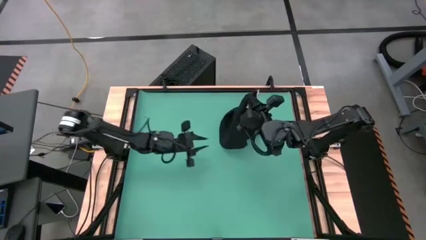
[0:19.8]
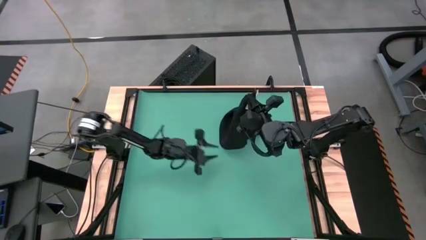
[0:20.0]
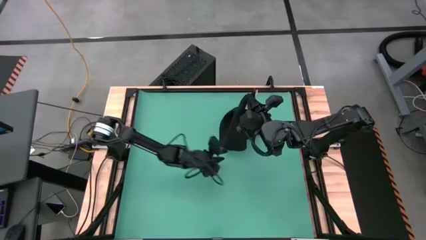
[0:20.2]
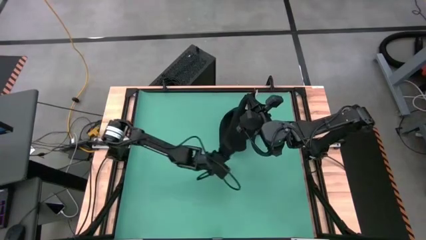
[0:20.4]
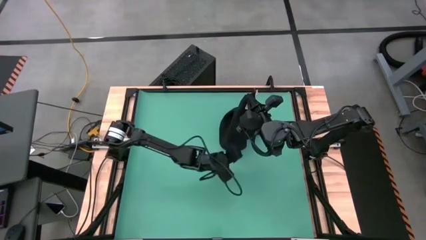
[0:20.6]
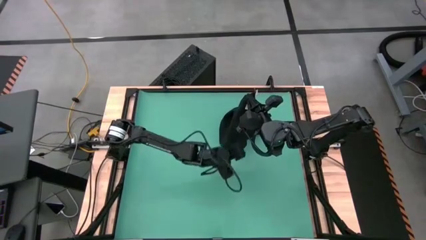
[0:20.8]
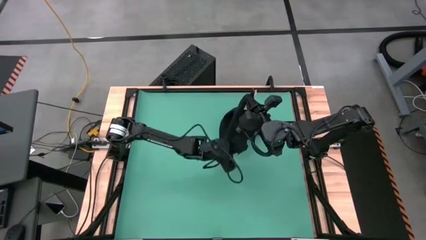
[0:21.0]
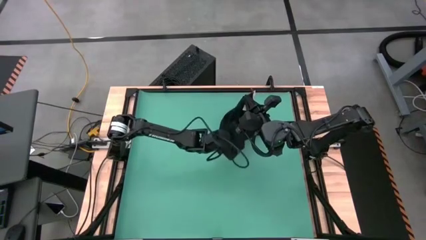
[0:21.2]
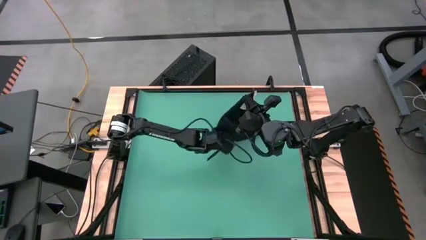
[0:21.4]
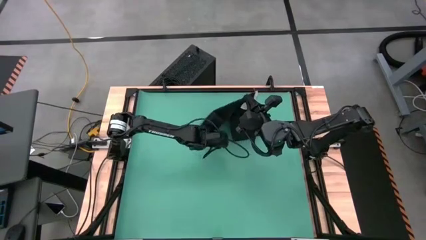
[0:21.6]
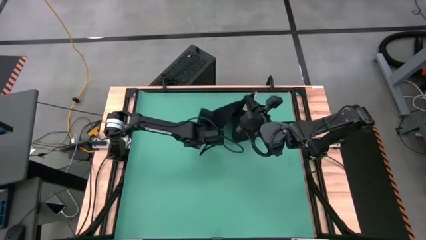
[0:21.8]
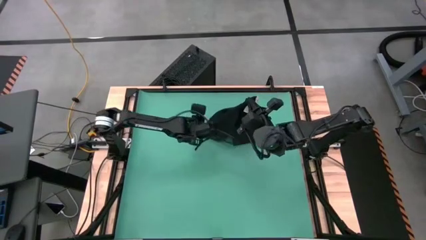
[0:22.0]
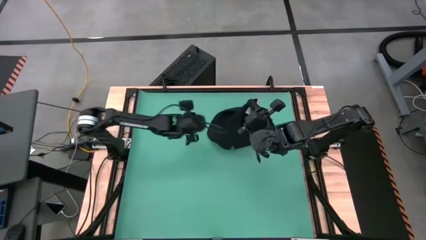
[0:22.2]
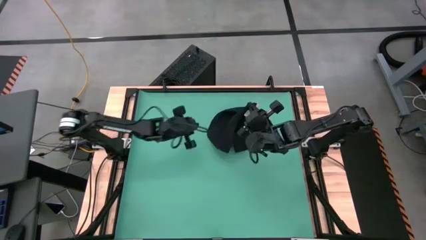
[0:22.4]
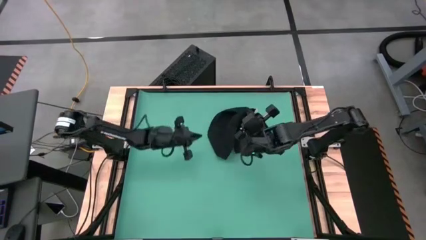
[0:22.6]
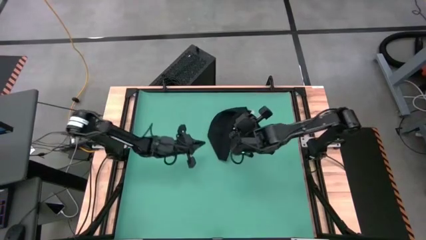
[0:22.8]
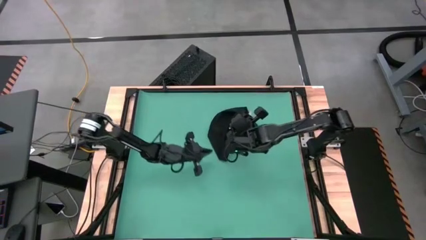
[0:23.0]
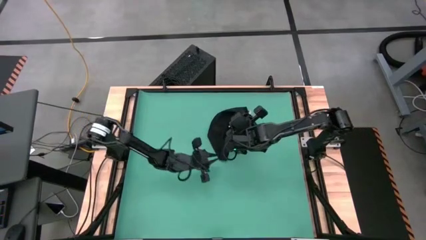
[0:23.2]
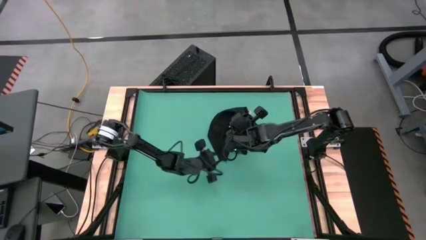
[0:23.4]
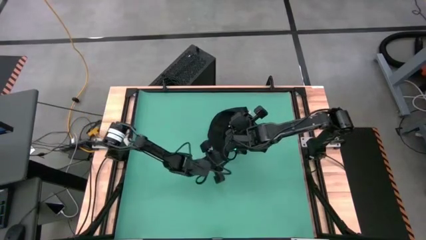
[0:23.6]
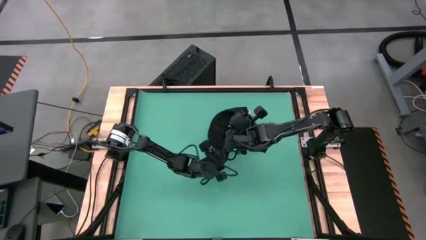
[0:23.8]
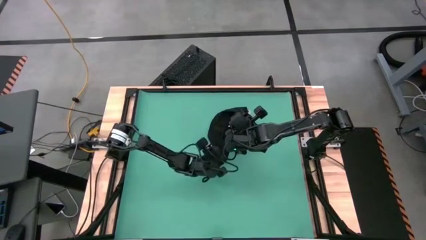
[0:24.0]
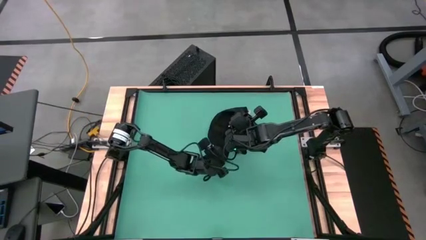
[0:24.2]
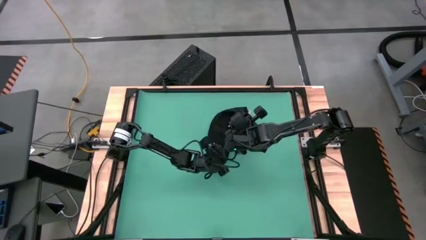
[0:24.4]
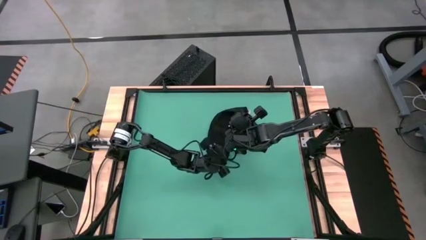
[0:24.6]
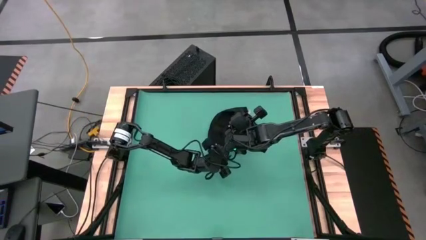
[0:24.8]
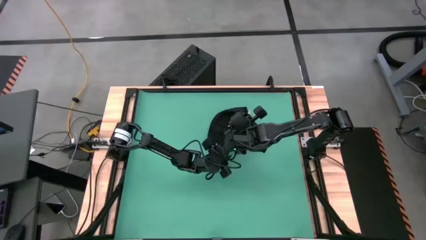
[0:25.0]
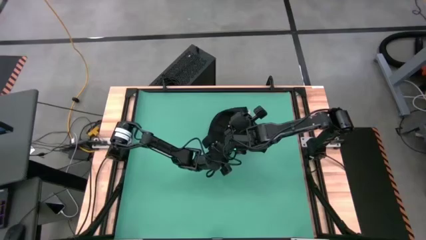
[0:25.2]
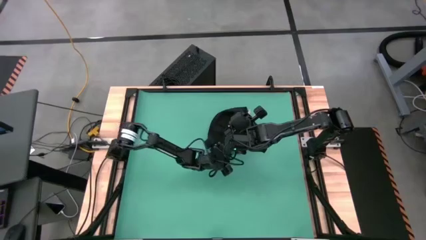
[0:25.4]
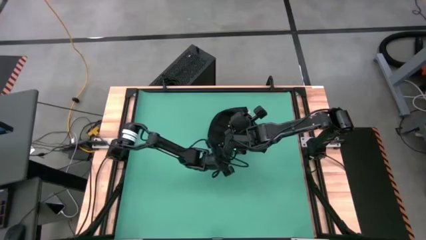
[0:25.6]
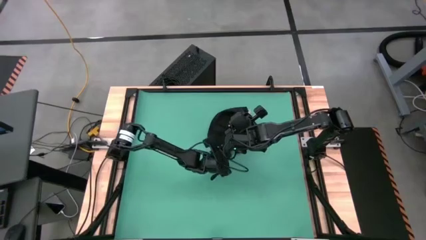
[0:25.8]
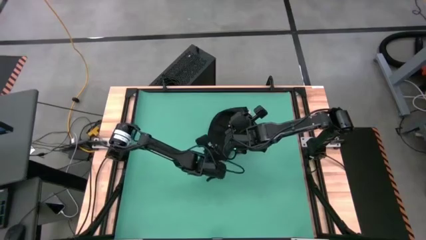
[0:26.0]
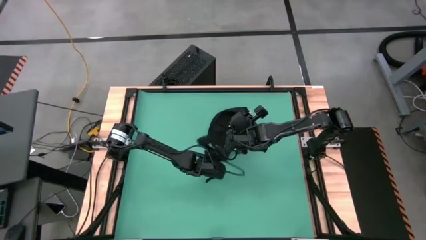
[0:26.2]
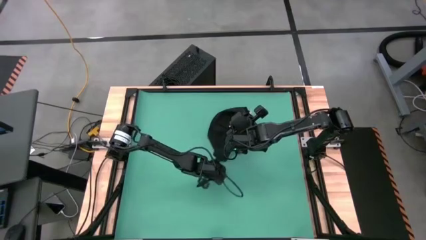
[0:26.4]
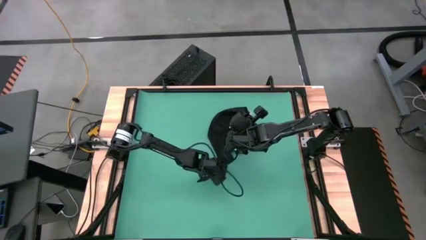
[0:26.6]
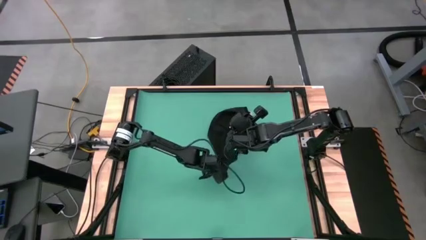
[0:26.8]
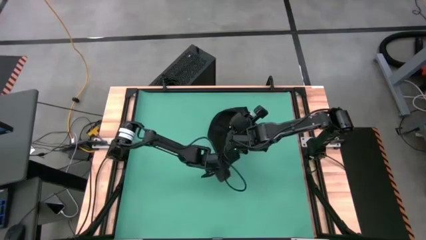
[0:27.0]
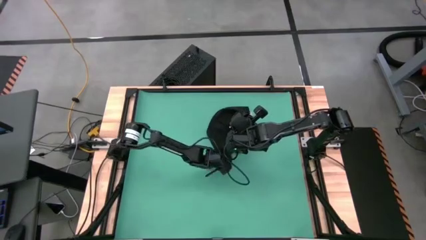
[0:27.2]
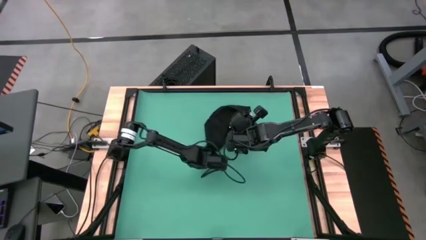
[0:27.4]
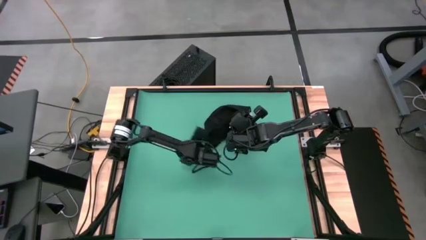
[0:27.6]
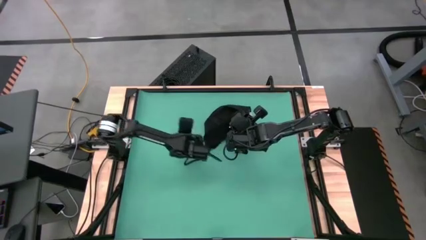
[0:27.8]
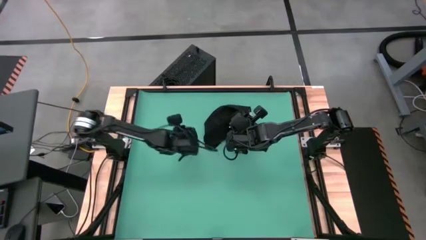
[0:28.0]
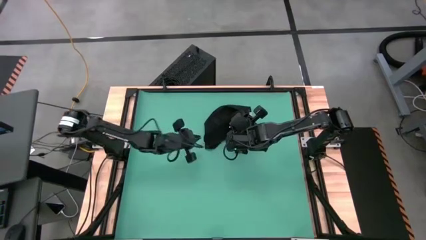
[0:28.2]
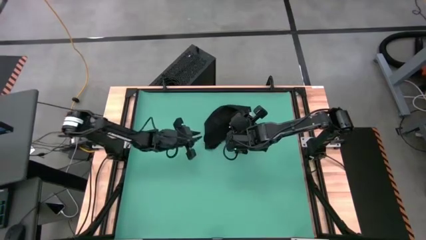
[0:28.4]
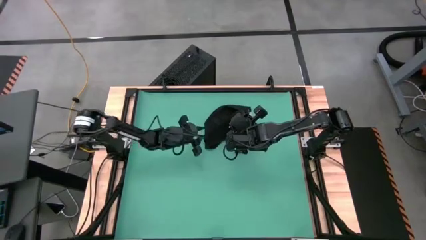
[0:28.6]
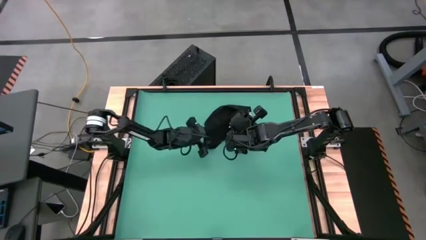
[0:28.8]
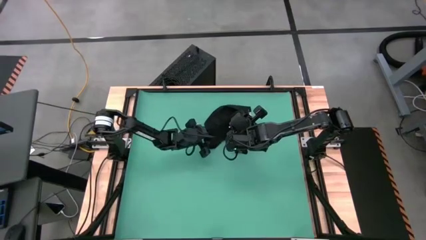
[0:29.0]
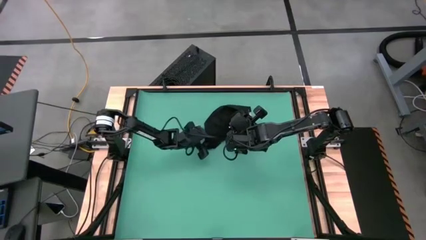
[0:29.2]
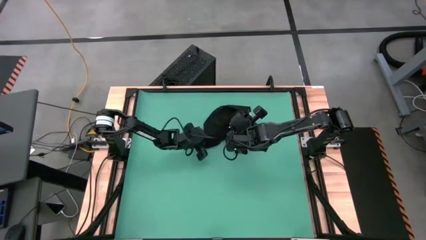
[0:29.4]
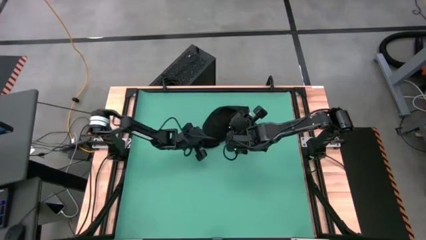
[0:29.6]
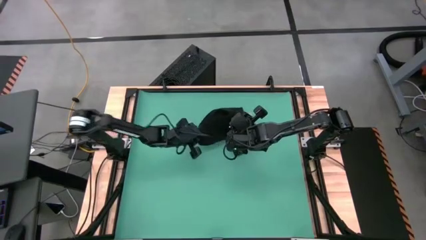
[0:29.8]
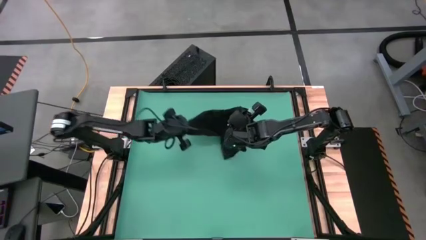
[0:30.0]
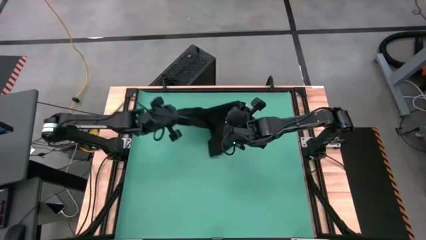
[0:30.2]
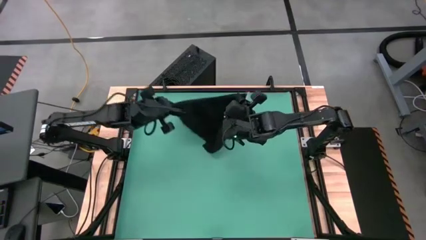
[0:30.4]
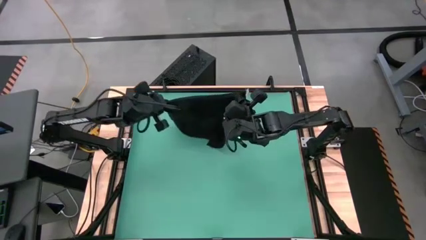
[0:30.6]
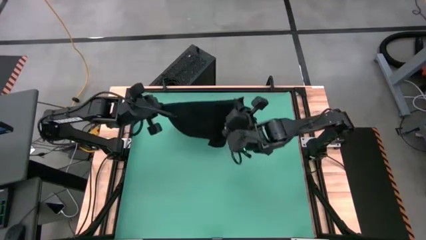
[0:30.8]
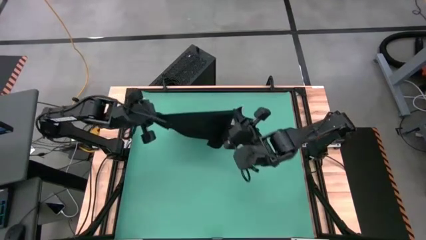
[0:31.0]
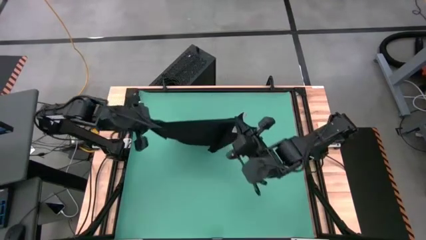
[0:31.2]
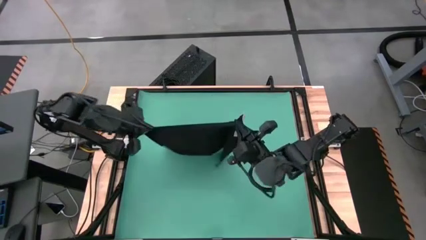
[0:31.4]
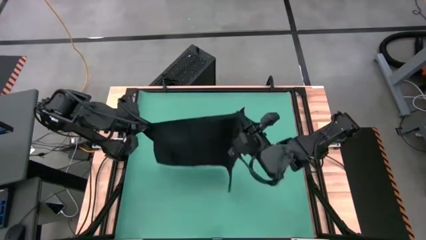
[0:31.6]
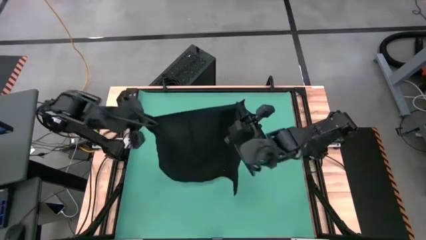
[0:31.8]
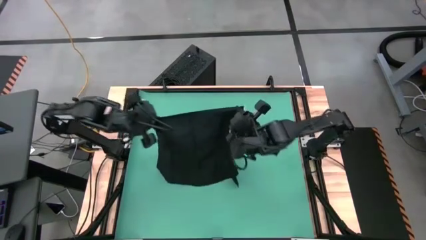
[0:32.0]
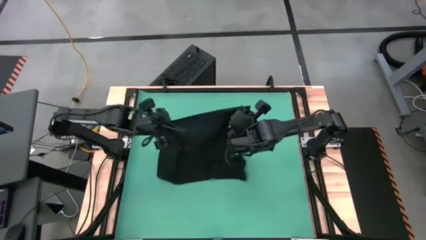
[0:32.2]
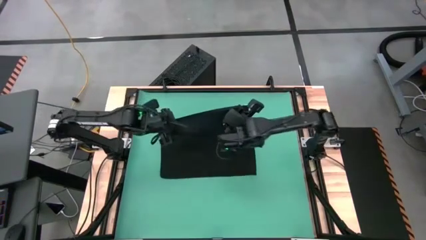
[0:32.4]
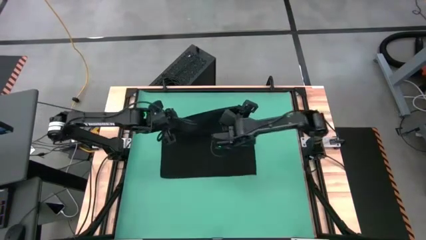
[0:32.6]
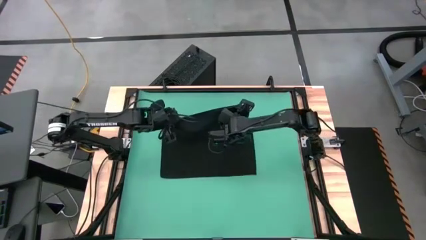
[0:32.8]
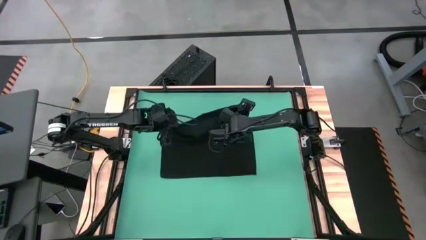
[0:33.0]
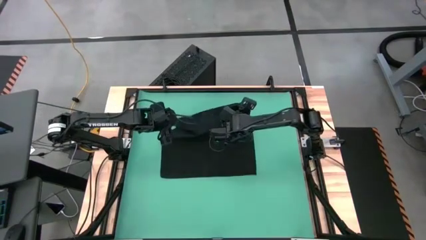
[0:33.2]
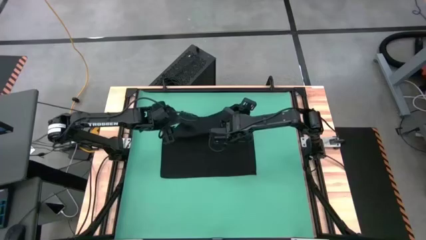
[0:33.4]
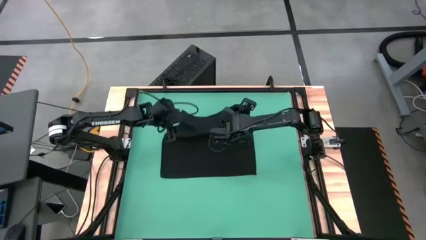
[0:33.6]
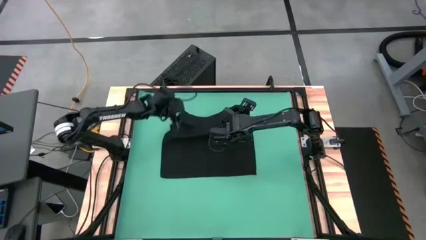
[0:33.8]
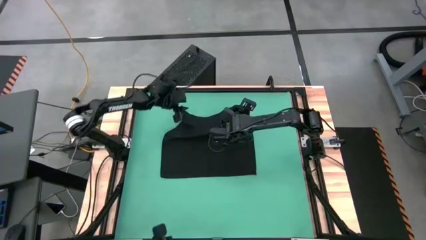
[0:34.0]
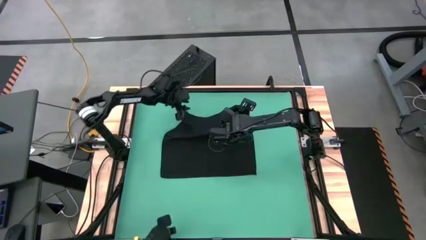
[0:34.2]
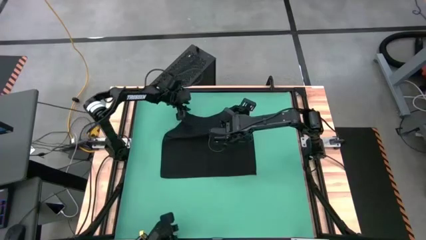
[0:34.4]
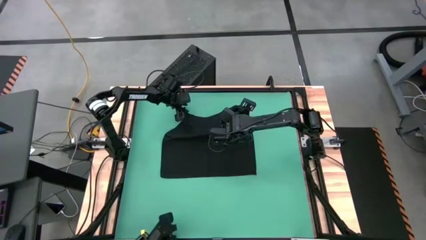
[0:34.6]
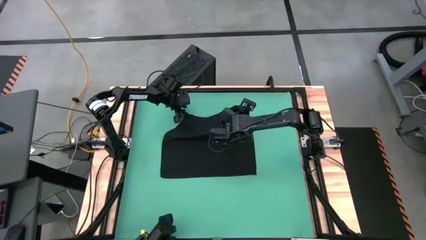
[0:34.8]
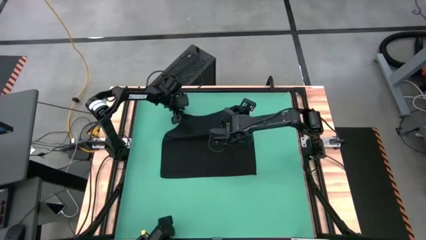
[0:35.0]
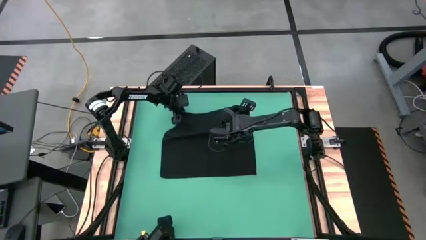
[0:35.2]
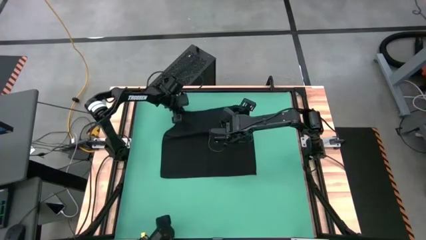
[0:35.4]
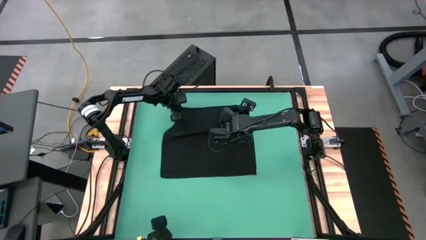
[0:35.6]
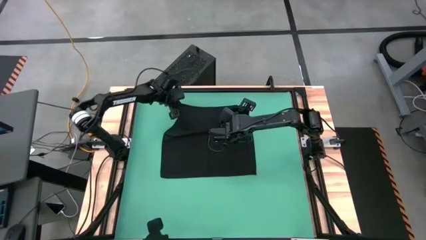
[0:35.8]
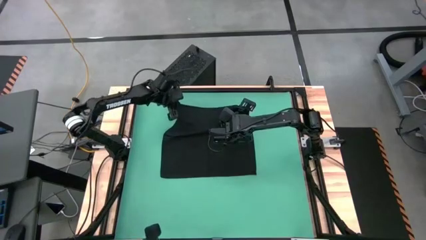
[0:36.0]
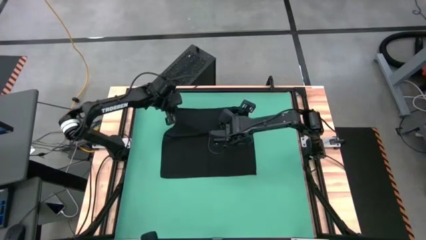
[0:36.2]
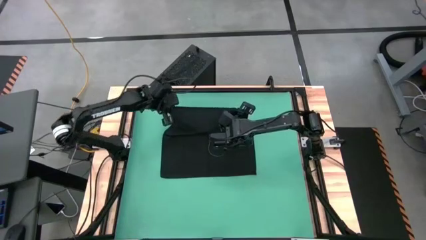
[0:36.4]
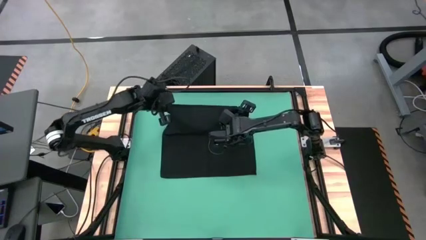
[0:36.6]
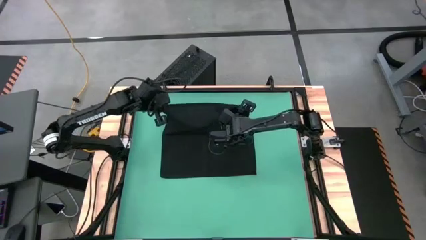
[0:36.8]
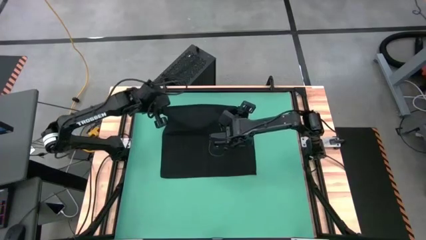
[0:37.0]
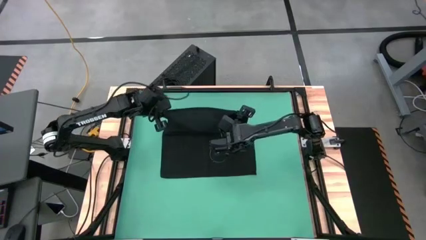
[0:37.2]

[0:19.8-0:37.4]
Task: Roll towel
Fold the black towel
